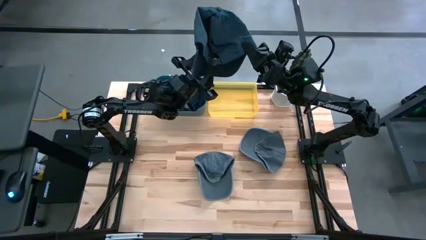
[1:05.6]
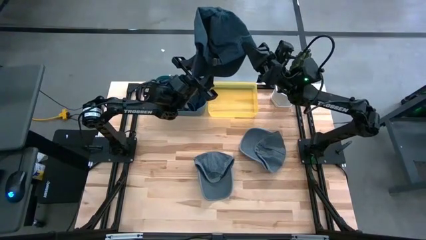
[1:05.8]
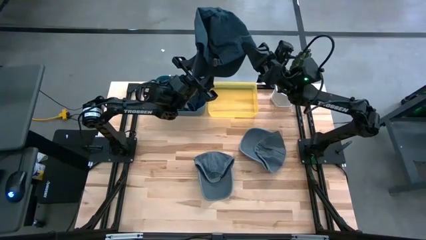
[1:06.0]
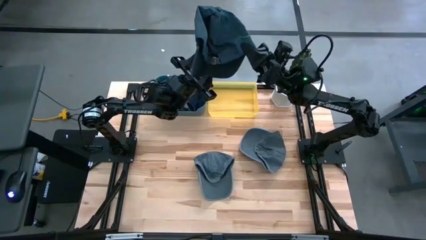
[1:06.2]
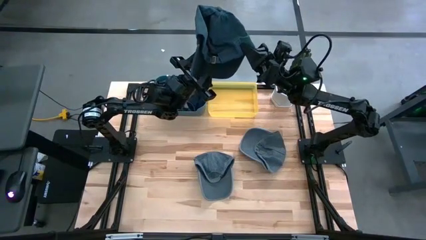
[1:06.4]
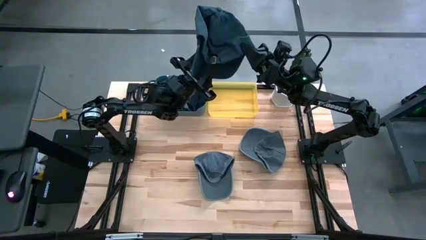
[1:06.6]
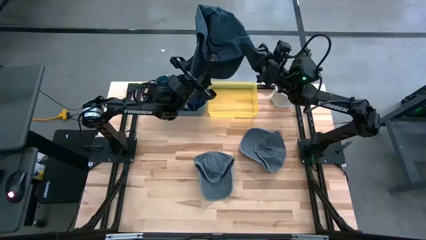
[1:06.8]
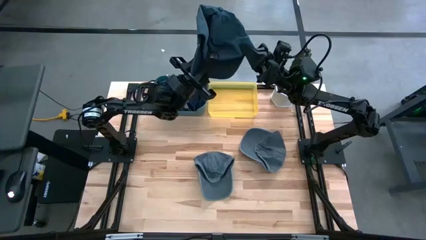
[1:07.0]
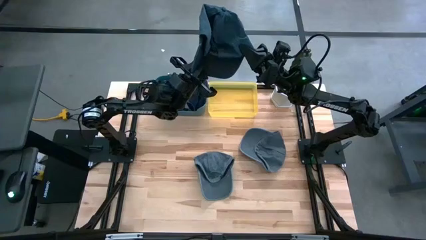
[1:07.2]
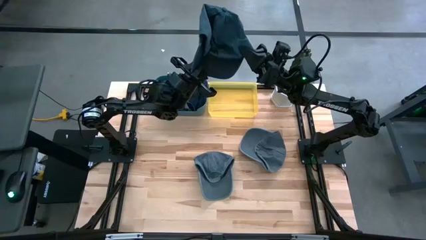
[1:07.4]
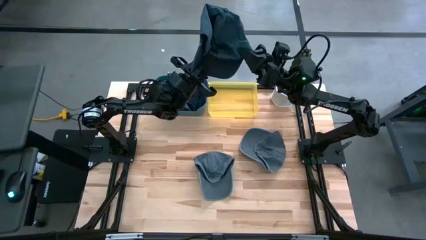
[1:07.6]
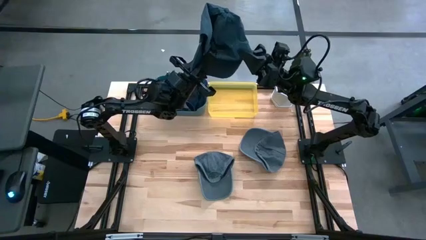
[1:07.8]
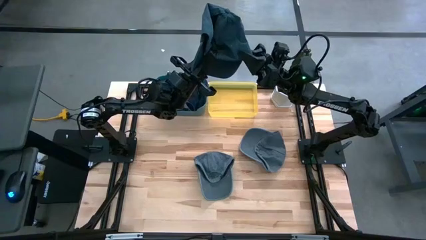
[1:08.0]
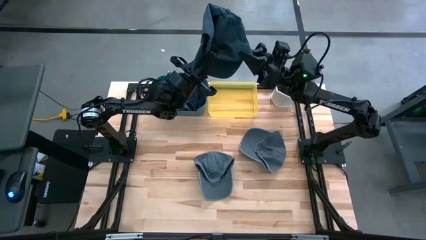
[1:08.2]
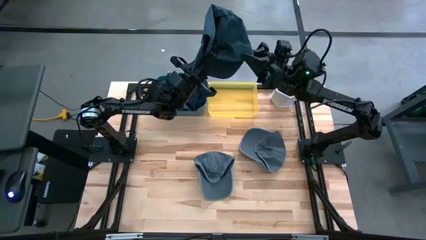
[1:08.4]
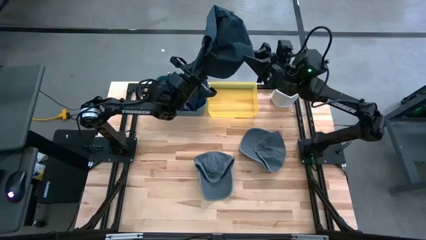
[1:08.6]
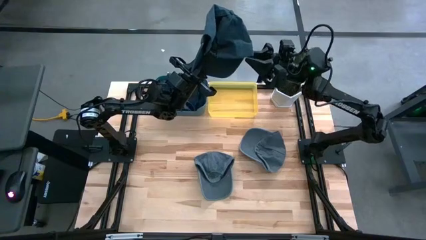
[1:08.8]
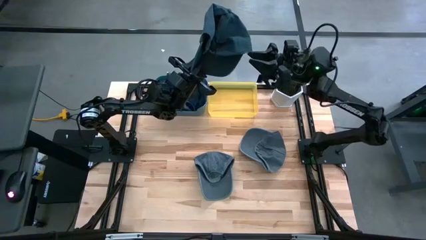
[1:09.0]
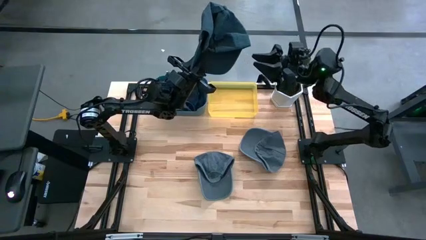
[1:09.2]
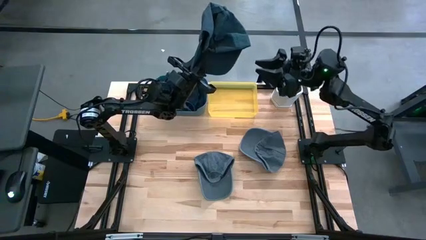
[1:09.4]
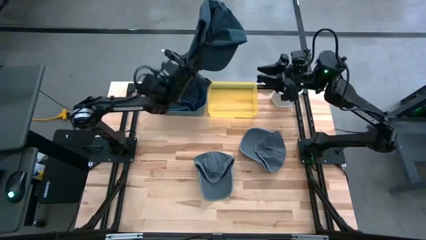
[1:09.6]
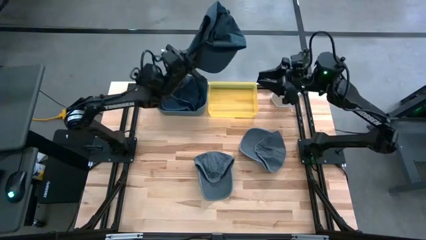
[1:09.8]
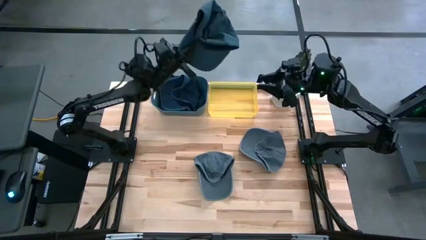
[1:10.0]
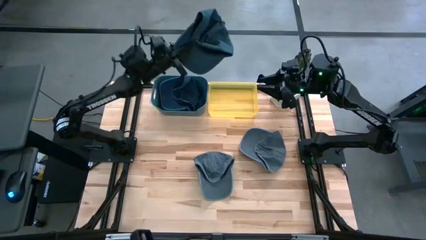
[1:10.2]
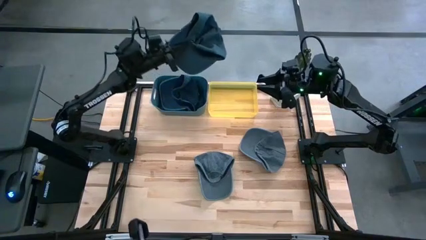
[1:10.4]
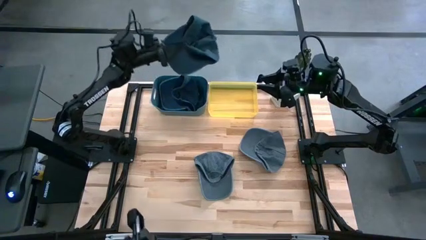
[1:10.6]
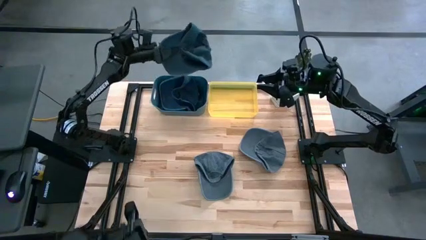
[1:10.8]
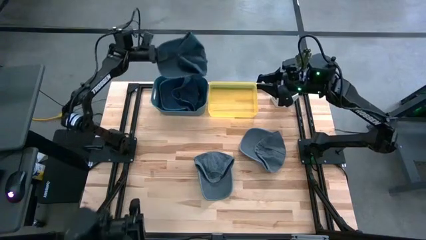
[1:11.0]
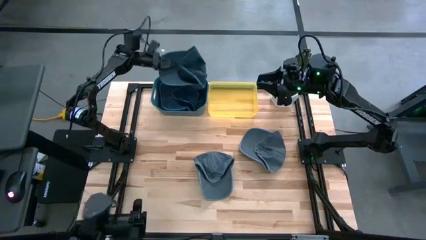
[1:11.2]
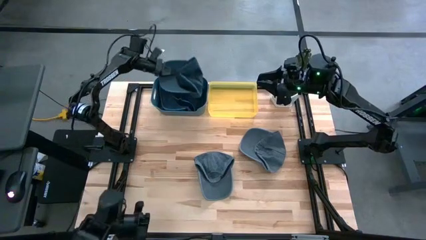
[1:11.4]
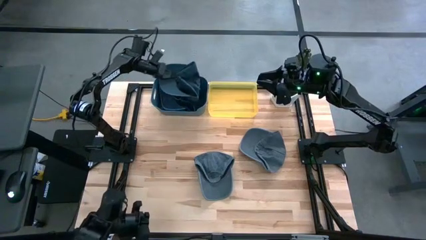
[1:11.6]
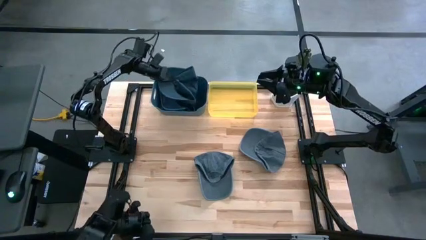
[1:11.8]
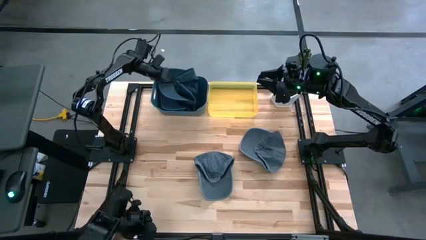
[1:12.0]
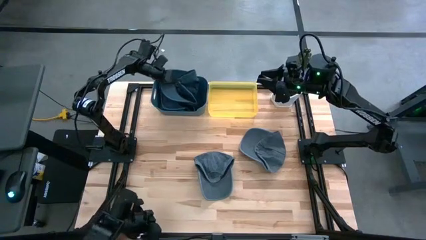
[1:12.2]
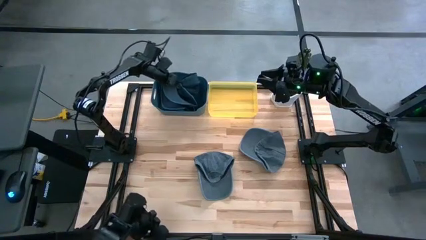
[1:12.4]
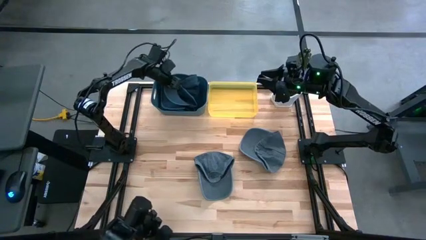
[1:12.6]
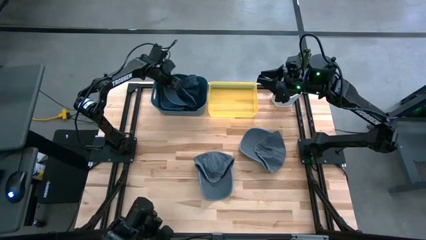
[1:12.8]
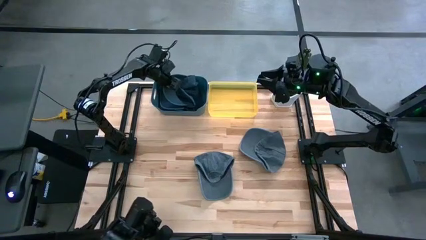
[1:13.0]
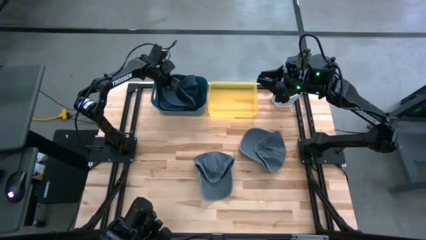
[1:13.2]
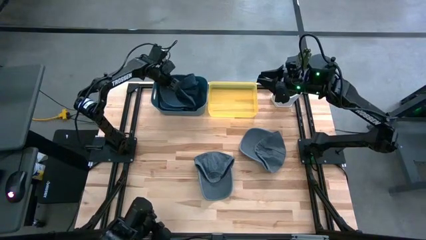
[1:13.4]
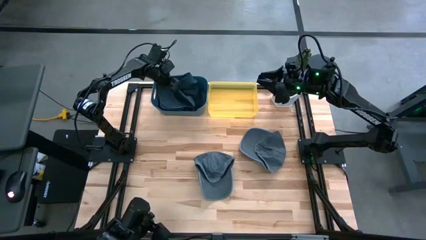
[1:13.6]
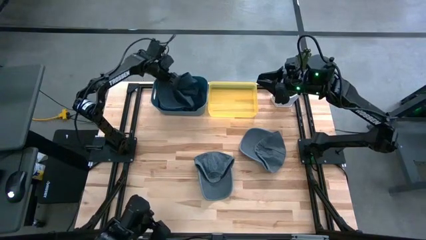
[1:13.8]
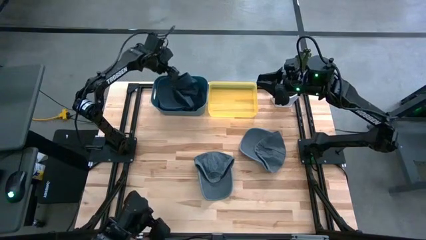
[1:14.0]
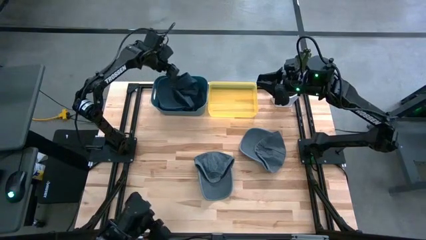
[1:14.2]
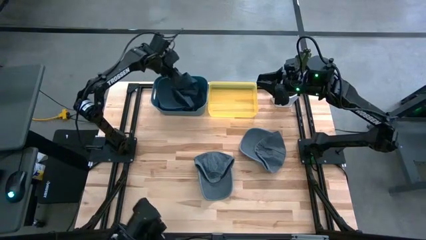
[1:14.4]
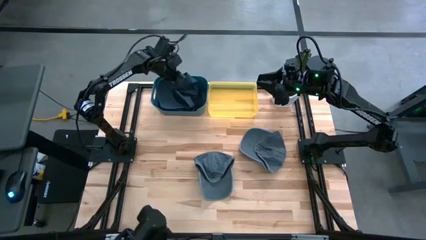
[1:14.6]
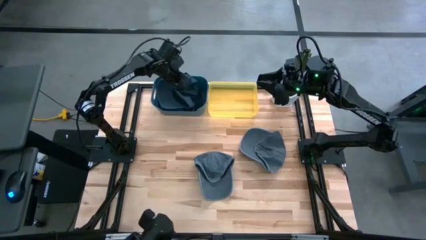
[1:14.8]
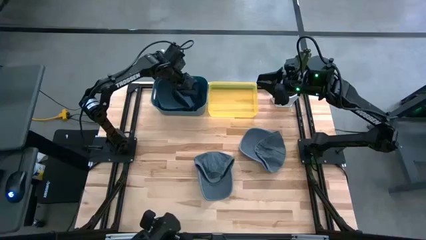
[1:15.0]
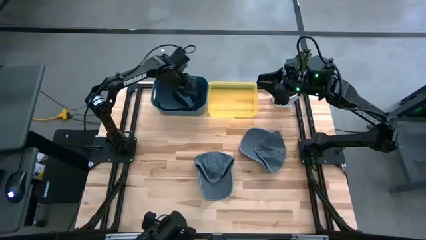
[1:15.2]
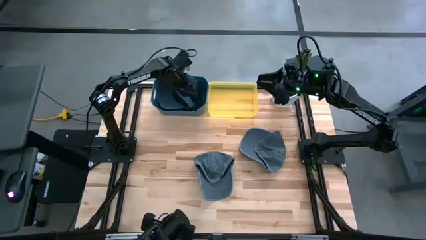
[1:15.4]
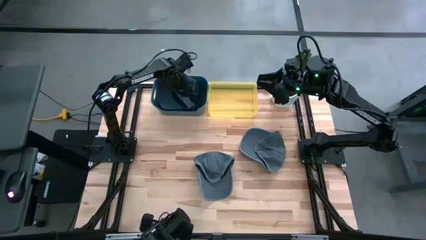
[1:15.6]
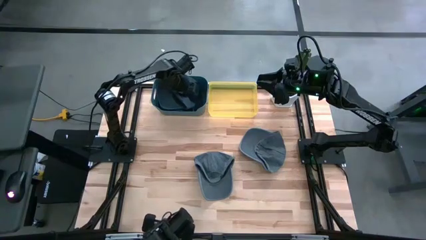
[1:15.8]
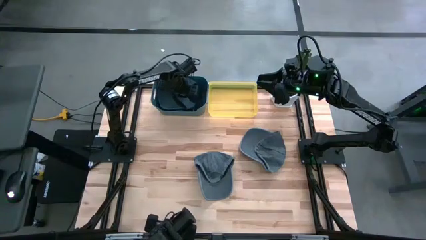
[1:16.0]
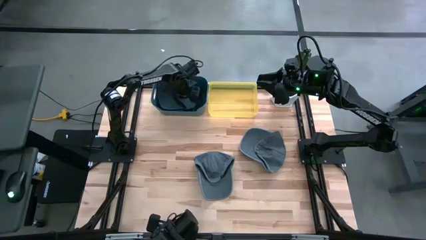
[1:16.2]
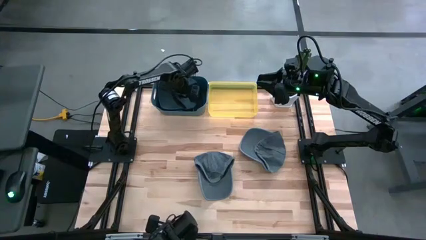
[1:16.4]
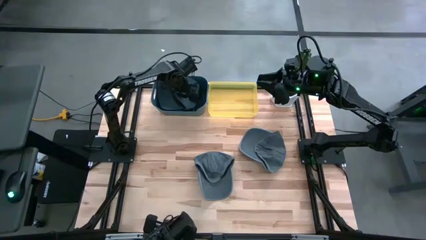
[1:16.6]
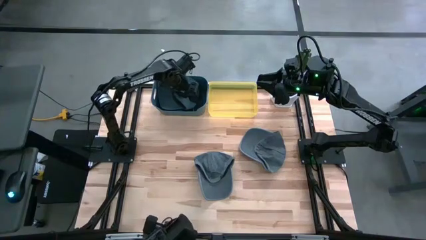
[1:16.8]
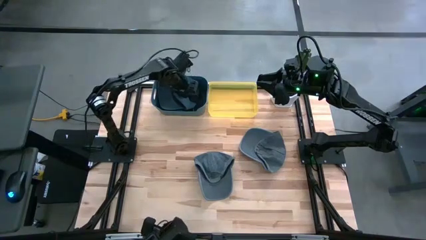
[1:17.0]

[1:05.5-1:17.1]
Task: Pick & Place hat
Put the blue cap into the blue bin

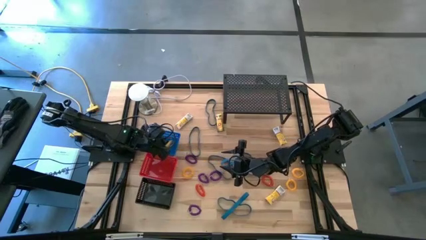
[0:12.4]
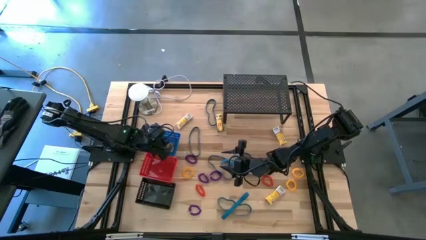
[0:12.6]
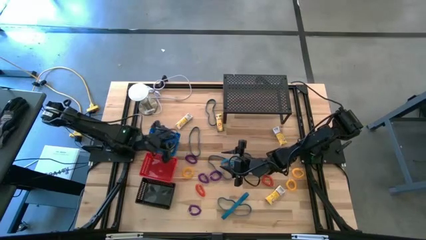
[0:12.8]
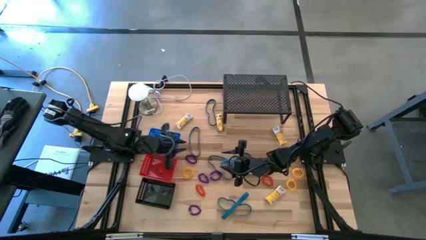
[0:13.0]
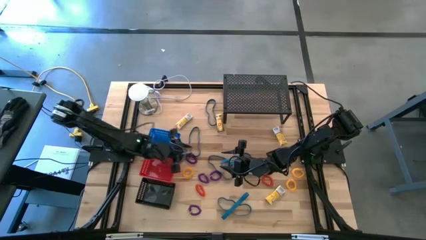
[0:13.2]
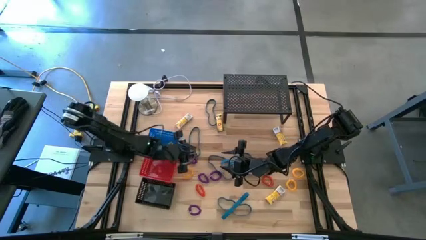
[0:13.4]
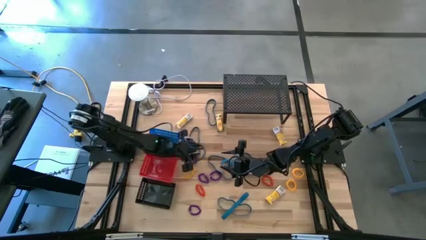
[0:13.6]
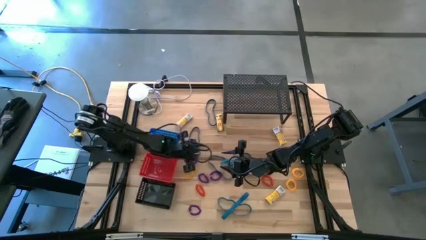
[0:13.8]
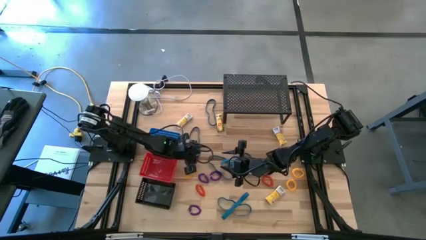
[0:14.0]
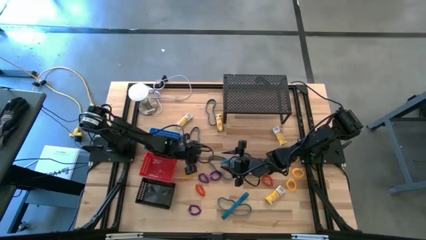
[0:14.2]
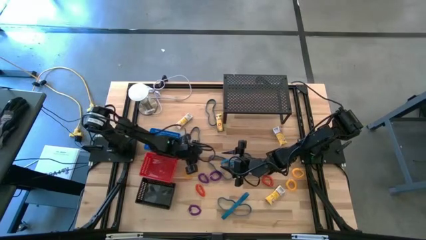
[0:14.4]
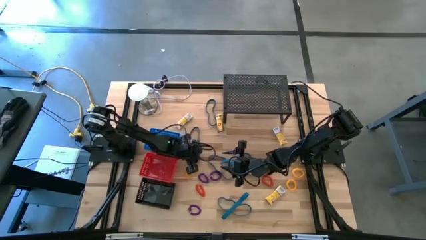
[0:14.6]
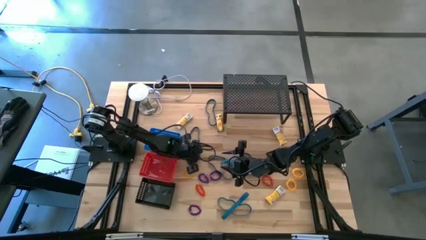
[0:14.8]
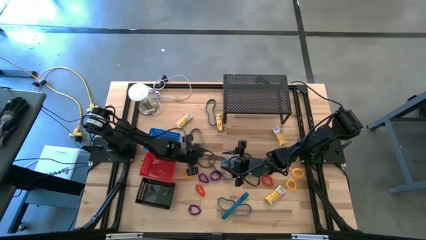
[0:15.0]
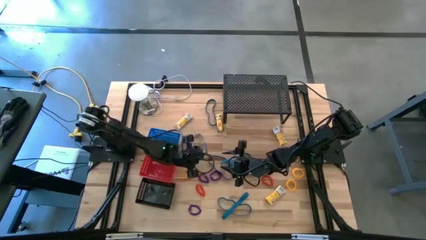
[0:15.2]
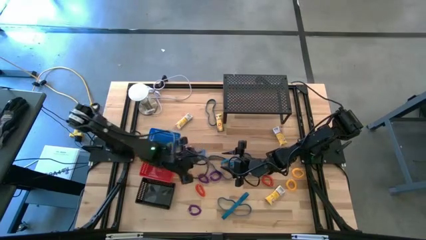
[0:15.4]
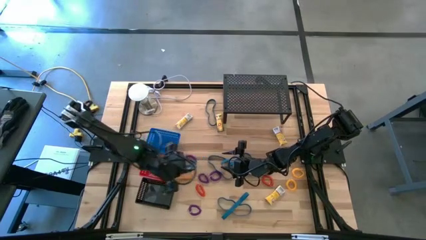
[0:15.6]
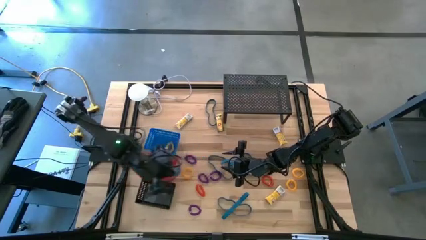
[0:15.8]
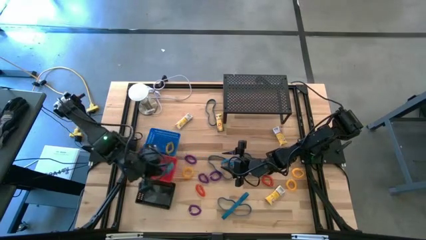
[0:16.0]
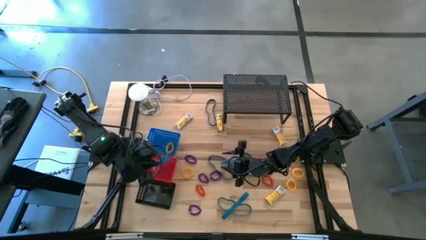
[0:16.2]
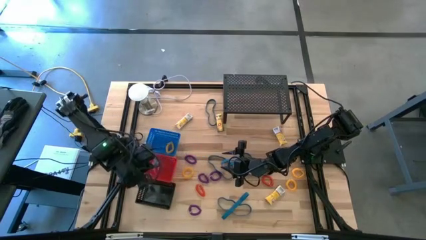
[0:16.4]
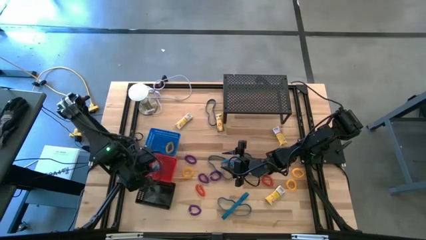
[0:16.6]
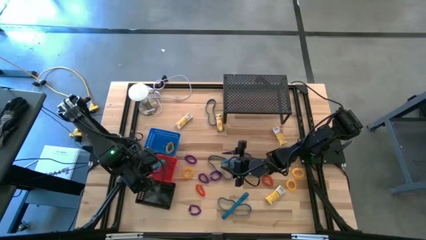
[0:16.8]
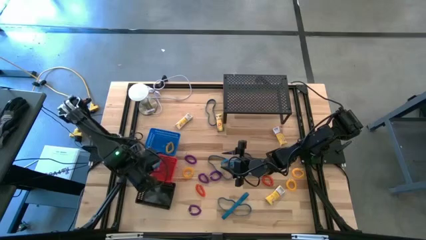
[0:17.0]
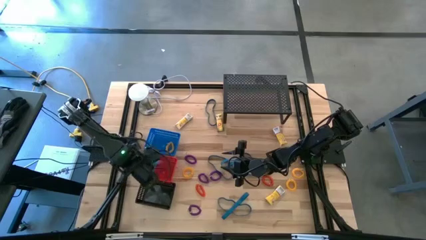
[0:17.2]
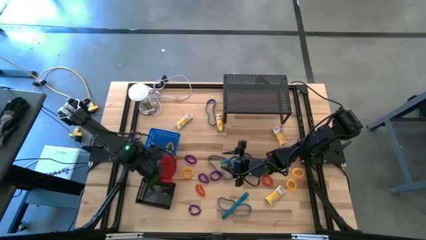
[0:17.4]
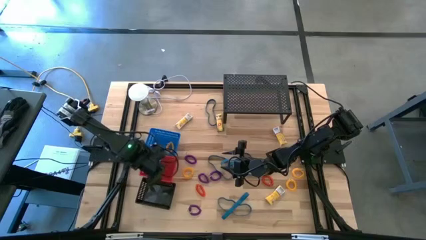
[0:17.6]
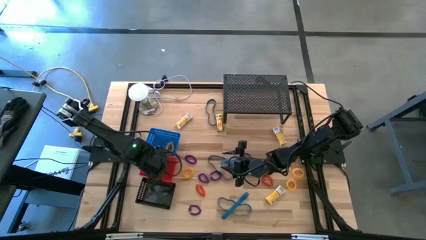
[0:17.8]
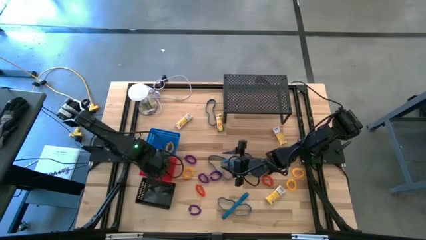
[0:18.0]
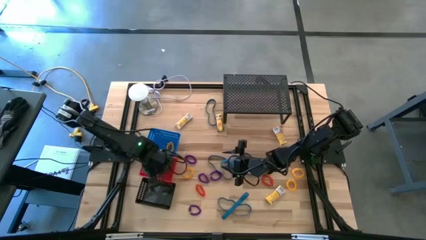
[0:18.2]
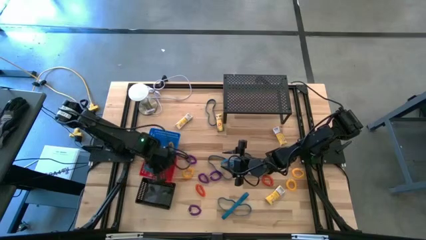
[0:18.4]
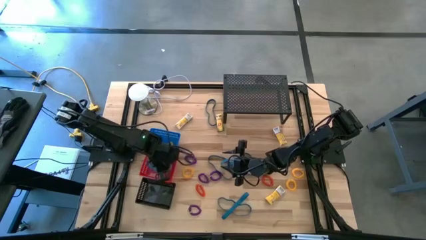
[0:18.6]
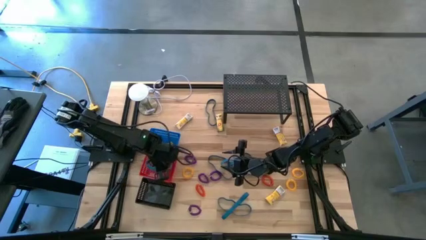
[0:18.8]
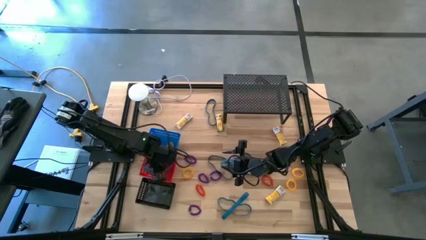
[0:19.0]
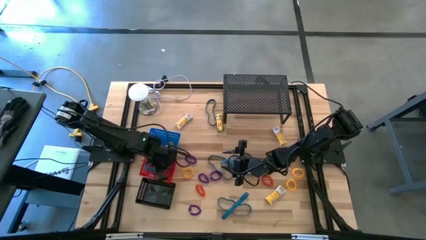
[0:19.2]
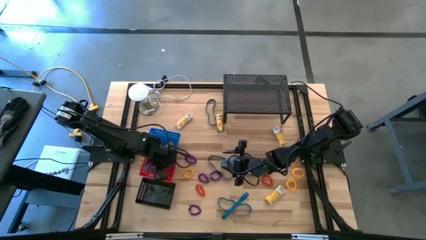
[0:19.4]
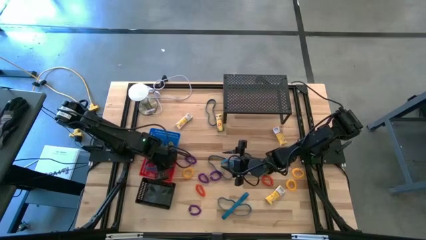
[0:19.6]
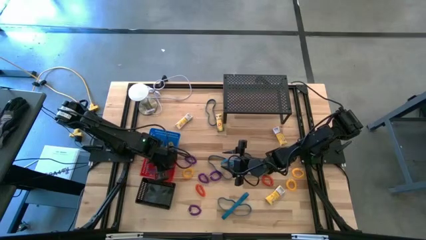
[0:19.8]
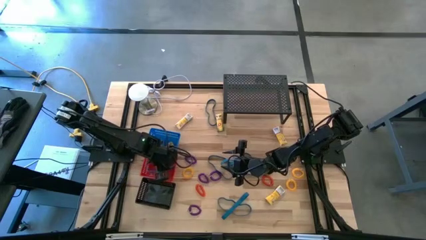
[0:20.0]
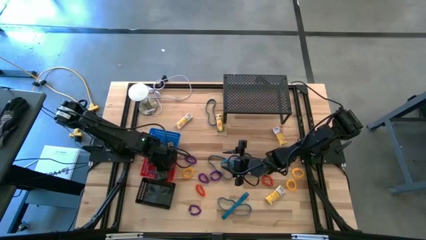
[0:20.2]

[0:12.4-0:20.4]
Task: Pick & Place Office Desk Supplies
Put the blue rubber band into the red bin
